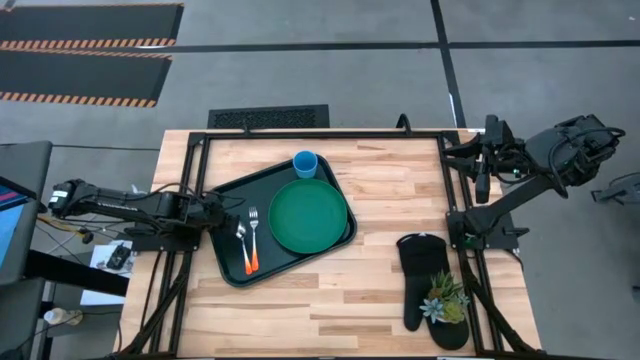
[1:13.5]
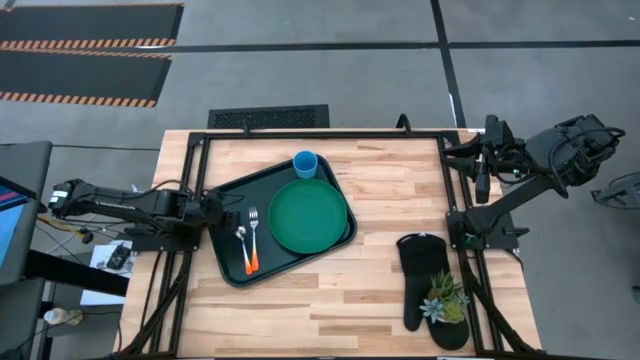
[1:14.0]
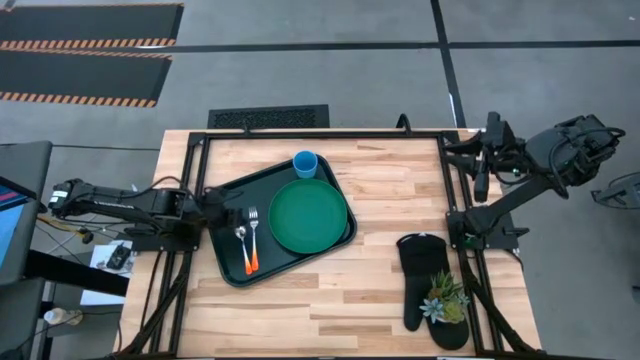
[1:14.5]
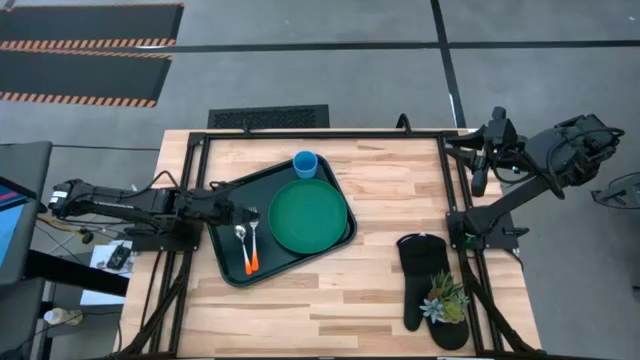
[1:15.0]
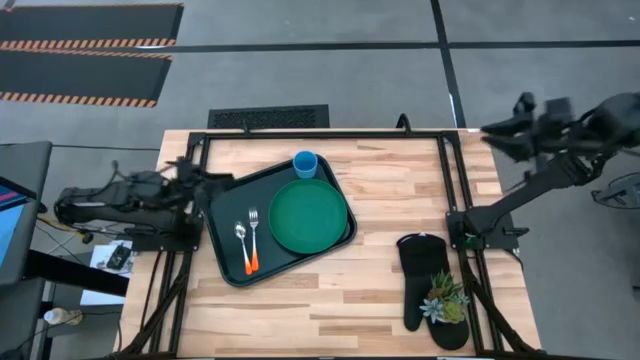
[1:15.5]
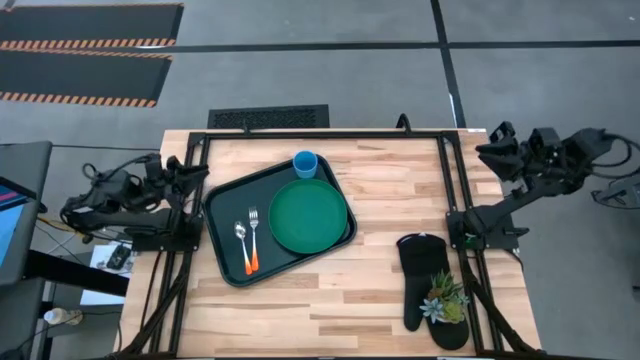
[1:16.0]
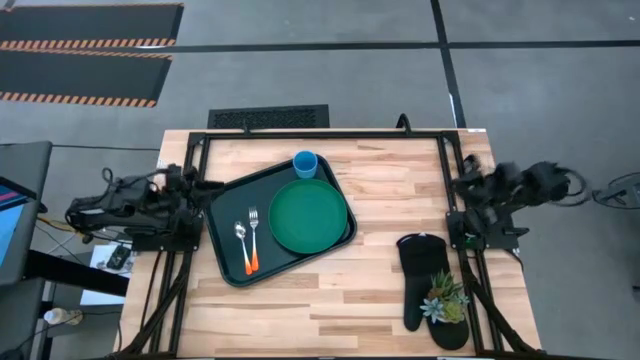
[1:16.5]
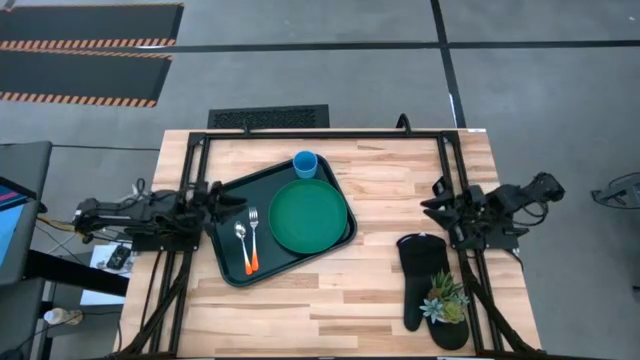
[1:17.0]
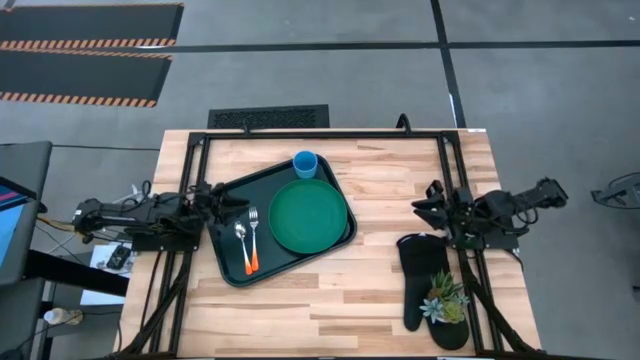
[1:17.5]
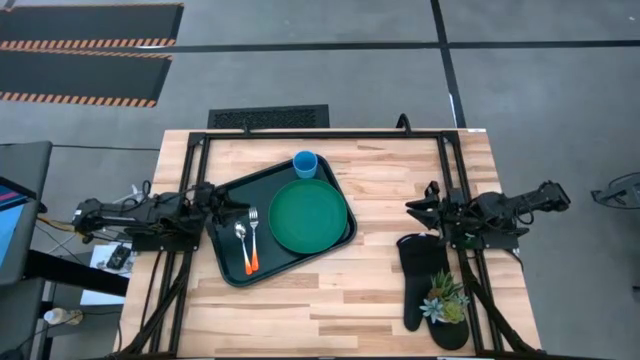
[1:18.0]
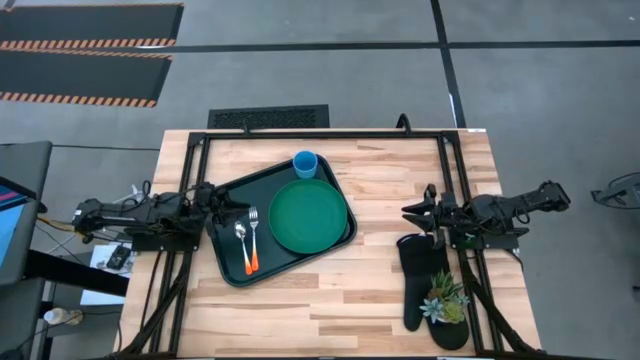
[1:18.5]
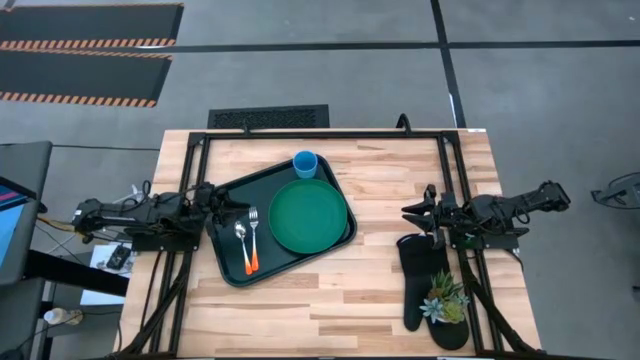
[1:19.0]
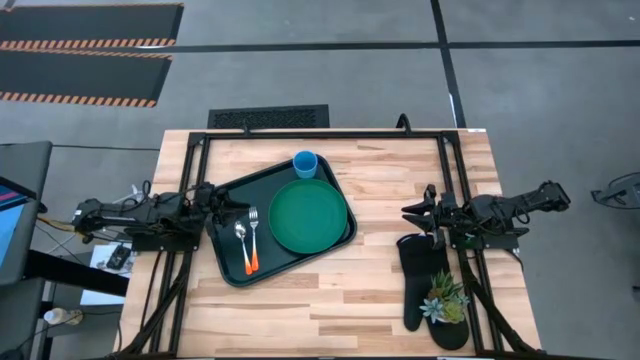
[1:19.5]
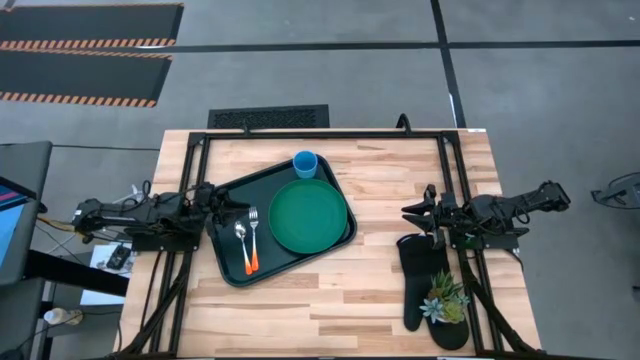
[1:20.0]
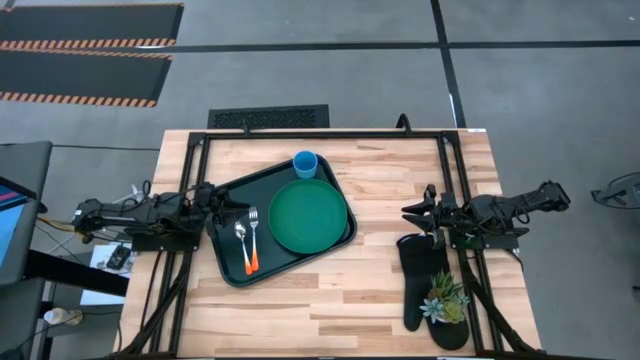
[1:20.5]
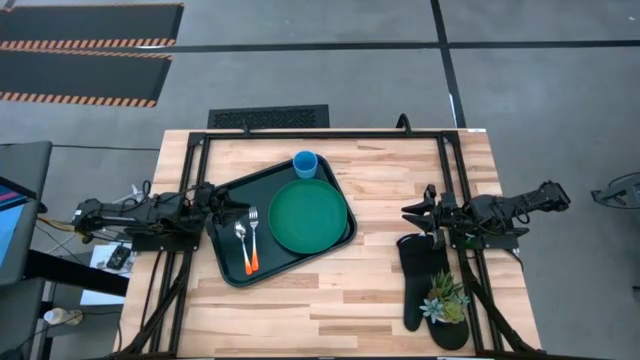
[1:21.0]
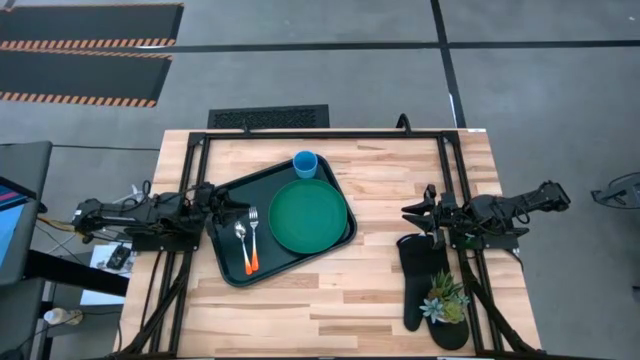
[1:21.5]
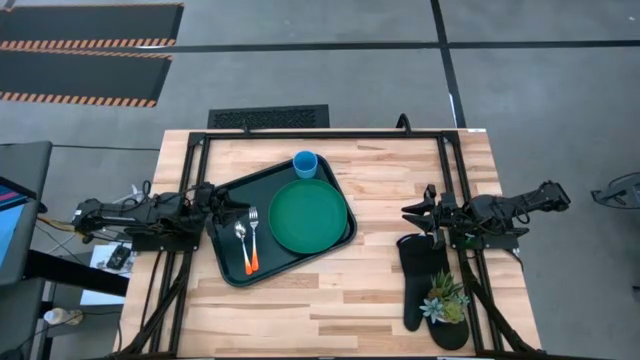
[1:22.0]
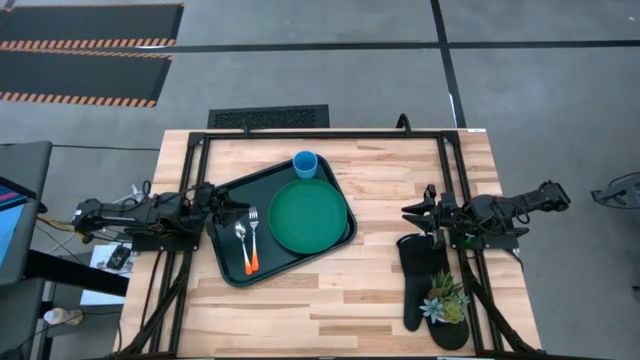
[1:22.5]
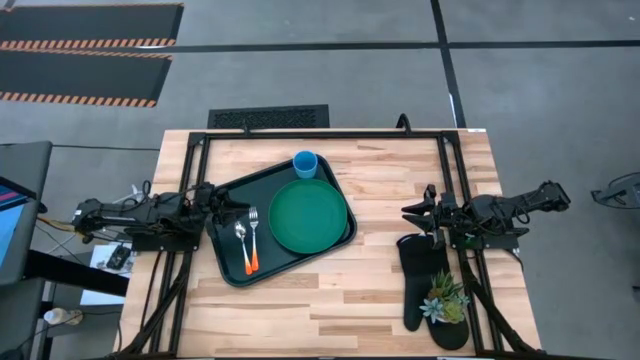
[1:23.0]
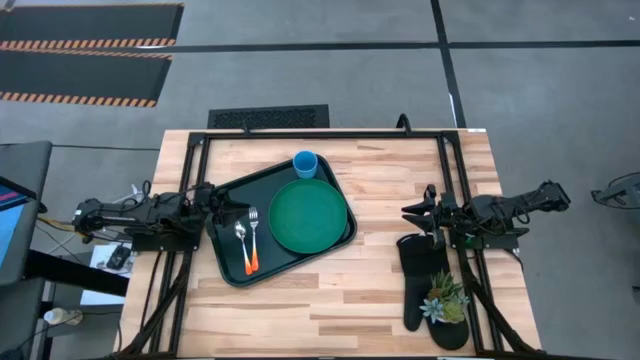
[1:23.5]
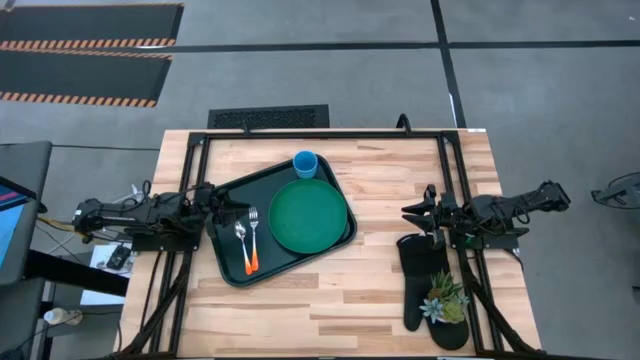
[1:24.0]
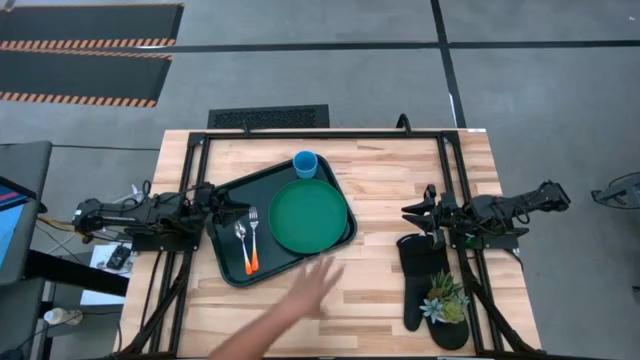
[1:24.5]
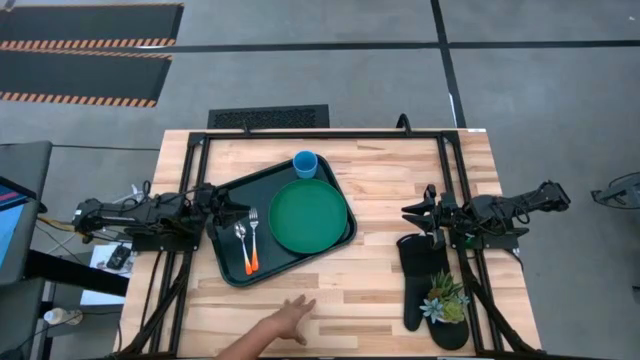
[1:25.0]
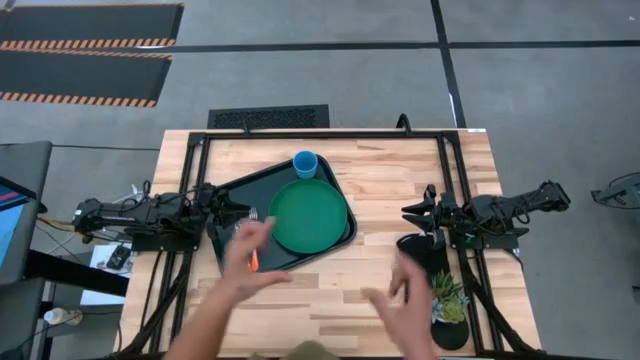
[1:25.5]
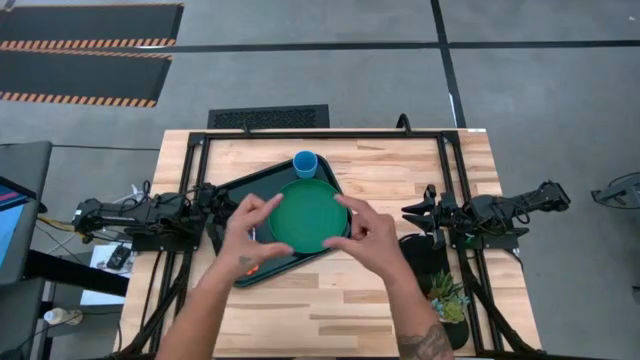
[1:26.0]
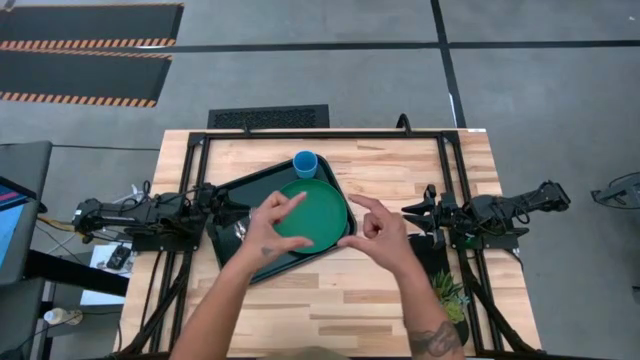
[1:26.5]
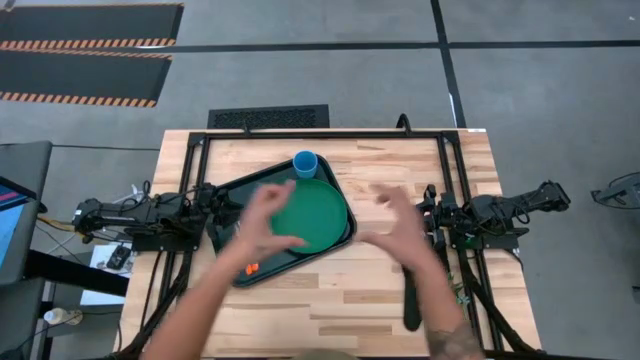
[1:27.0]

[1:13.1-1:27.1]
Task: Pick and place plate/cup/fork/spoon on tray
Return to Home Position

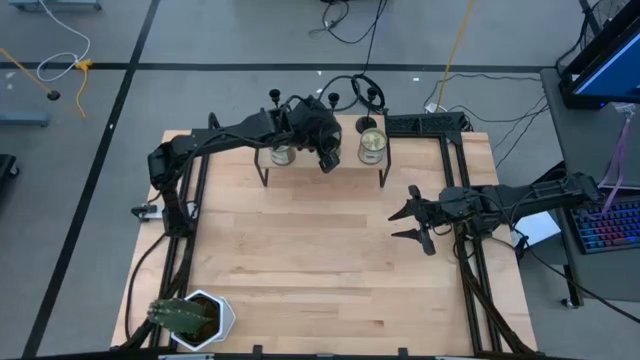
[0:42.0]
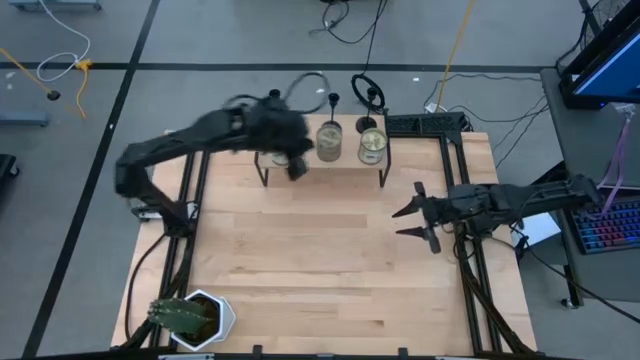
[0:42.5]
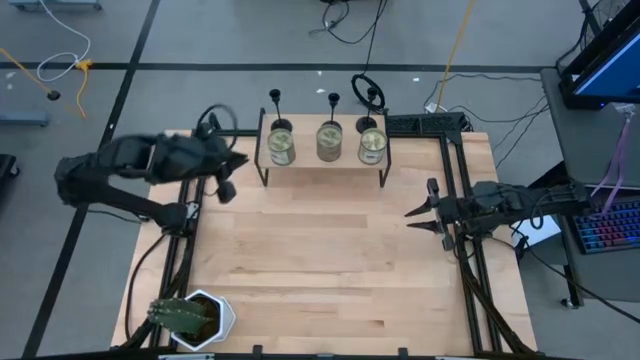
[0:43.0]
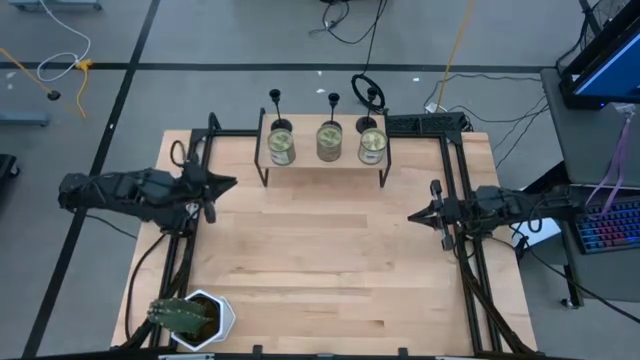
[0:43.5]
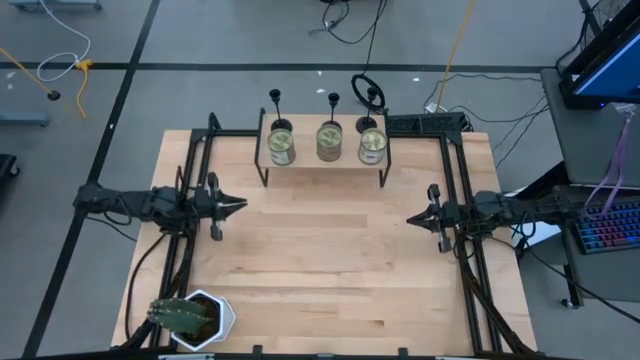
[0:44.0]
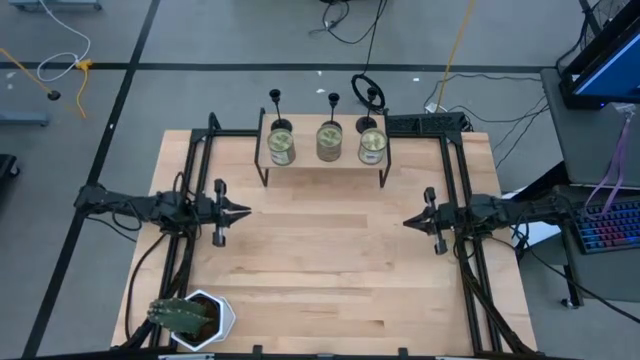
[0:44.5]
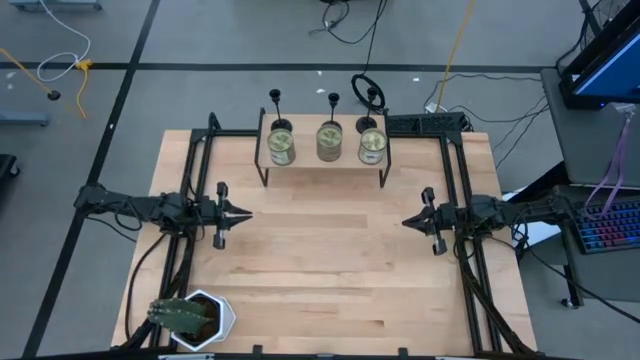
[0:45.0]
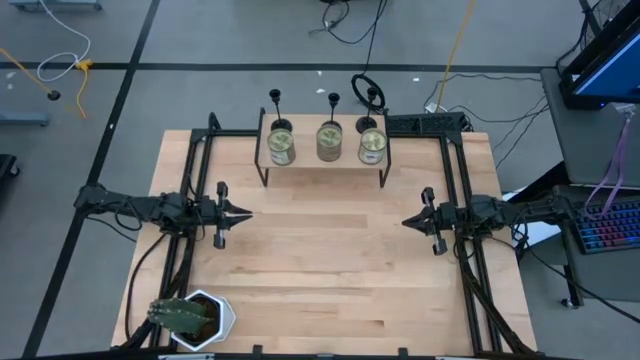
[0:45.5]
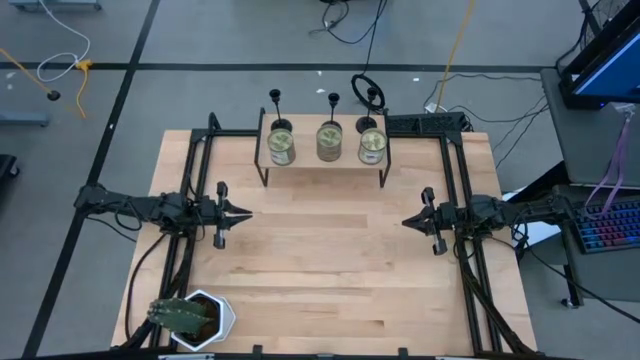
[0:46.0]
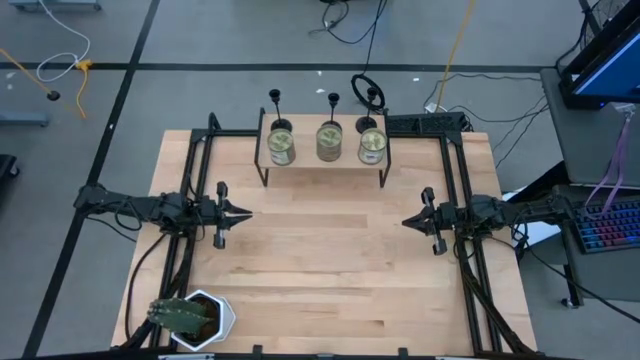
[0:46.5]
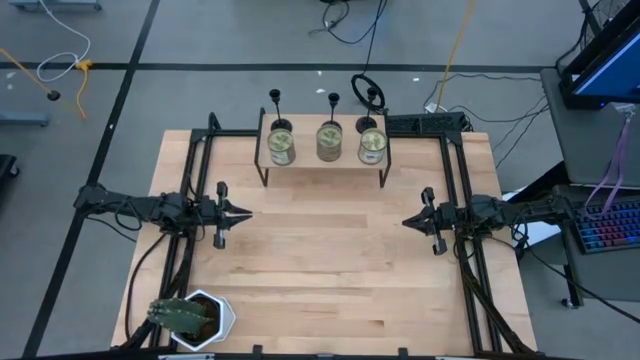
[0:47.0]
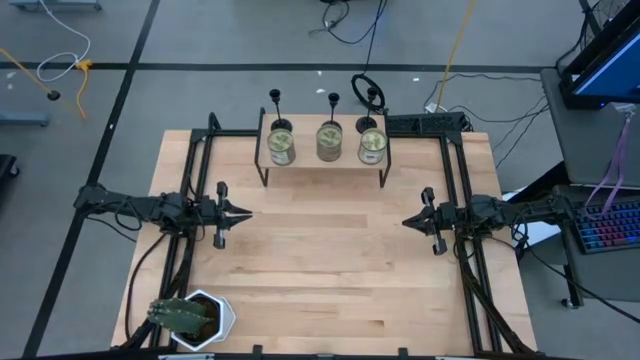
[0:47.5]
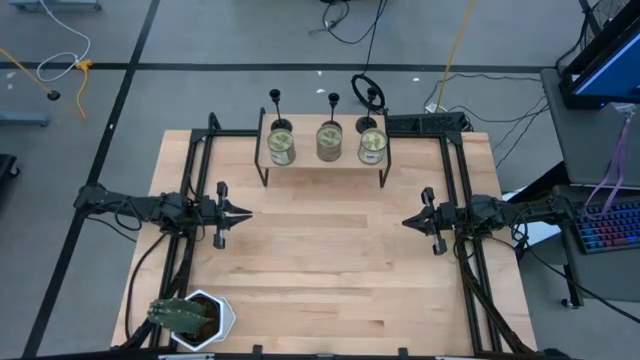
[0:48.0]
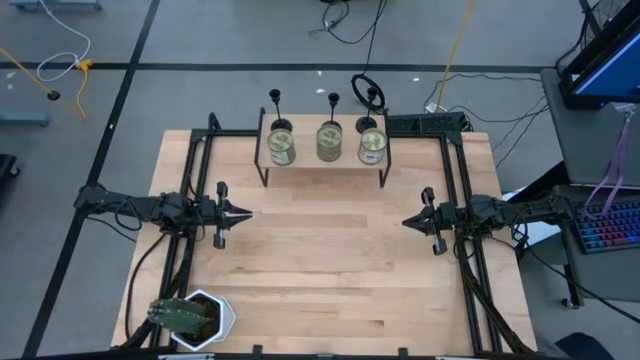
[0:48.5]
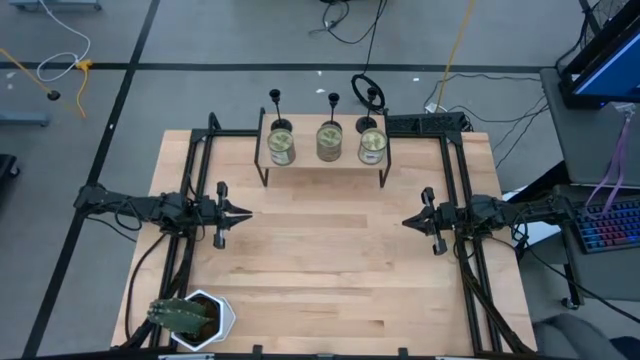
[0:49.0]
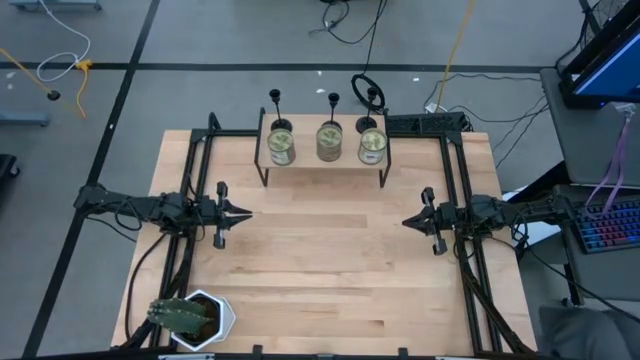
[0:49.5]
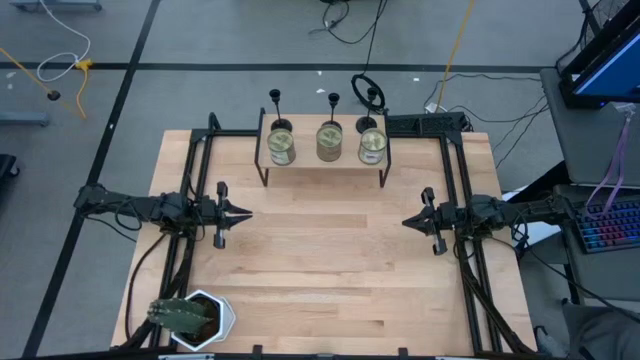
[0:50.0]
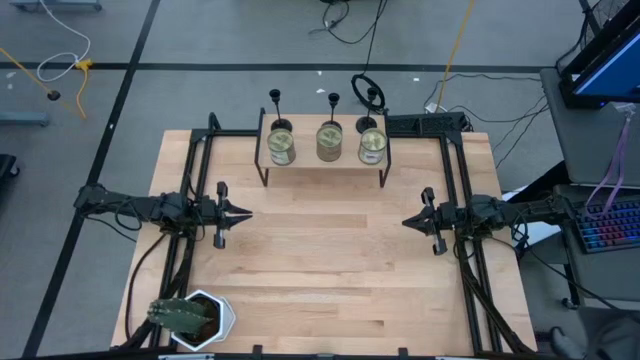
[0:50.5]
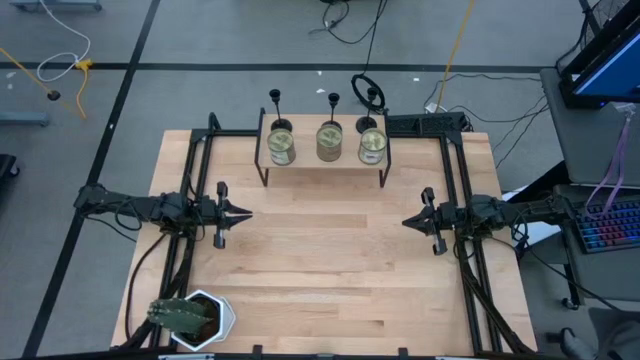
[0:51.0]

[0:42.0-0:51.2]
Task: Pick & Place candle stick holders
Return to Home Position
